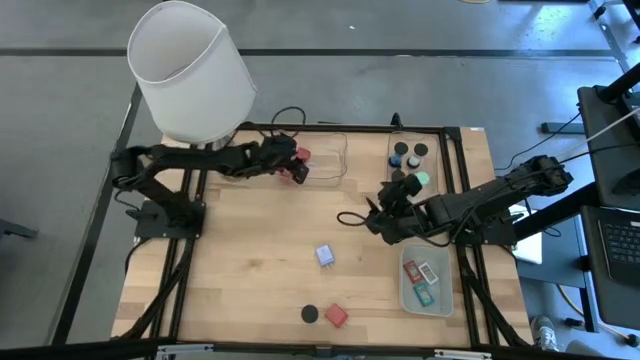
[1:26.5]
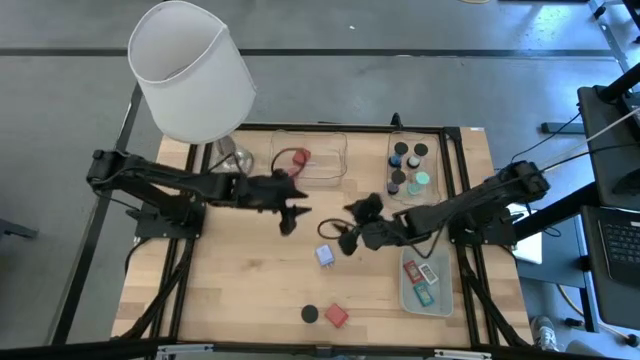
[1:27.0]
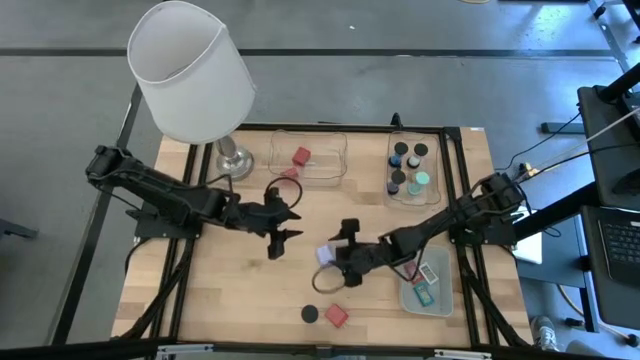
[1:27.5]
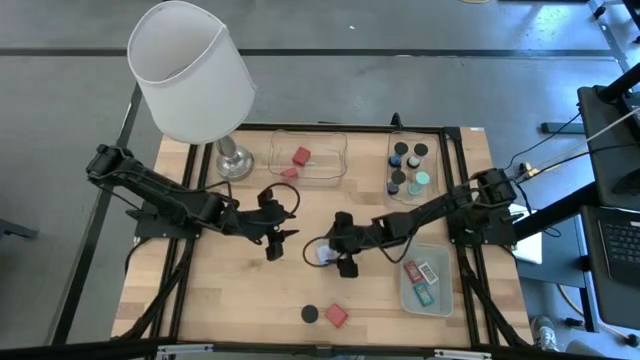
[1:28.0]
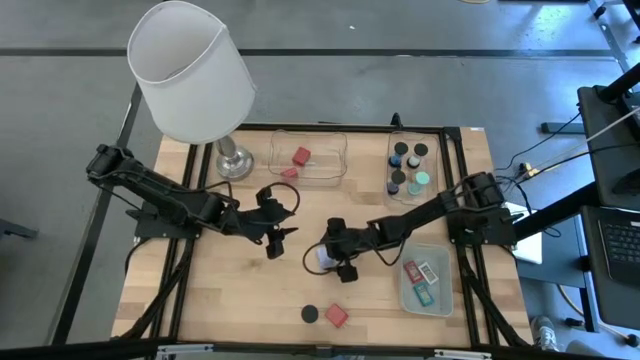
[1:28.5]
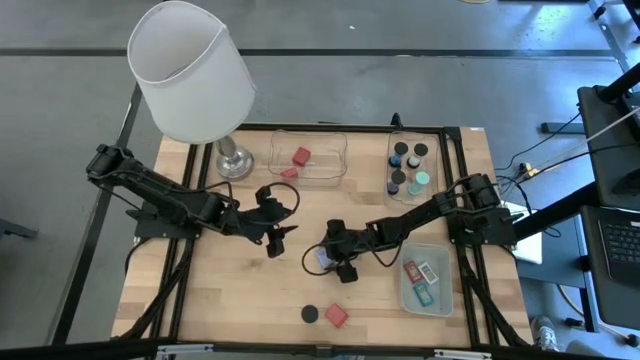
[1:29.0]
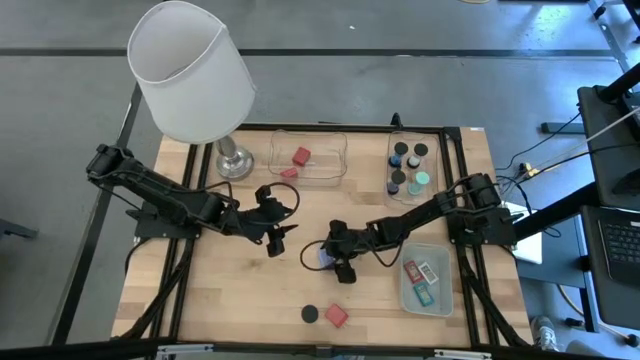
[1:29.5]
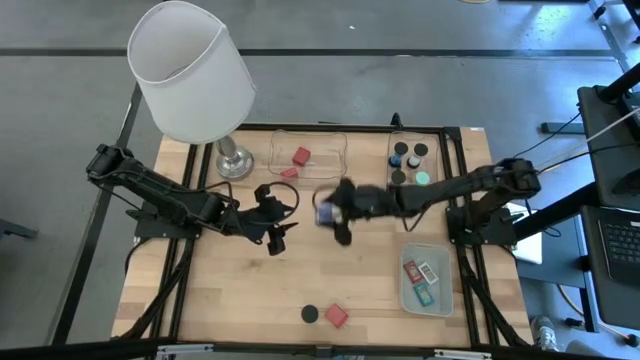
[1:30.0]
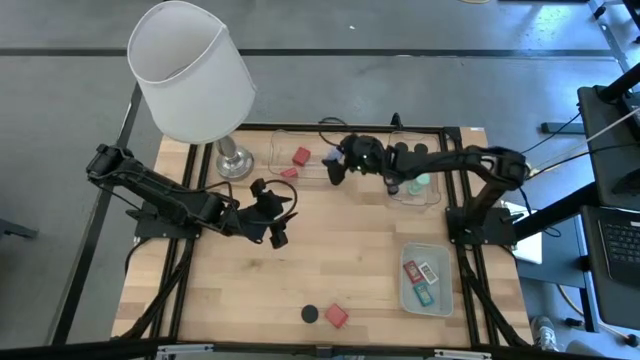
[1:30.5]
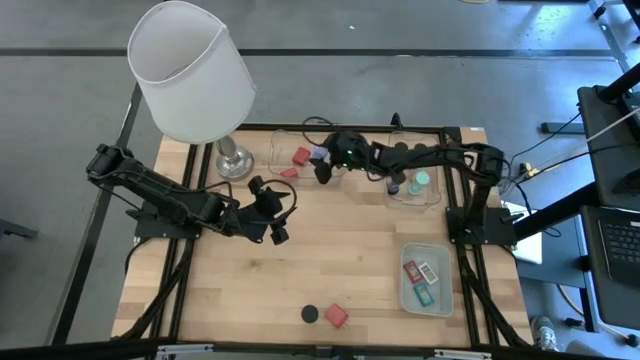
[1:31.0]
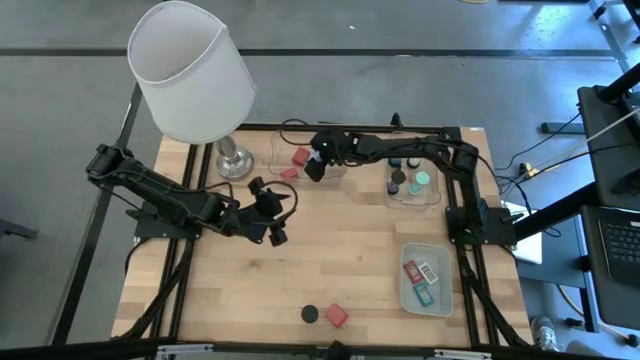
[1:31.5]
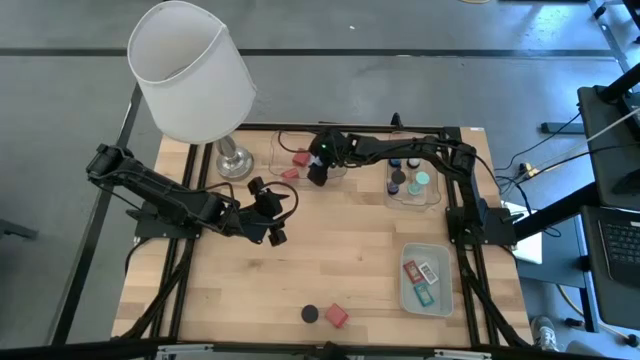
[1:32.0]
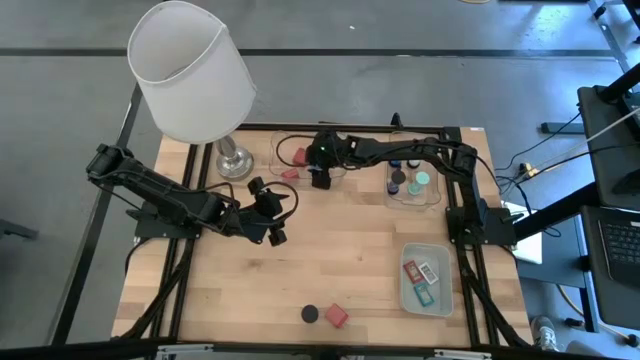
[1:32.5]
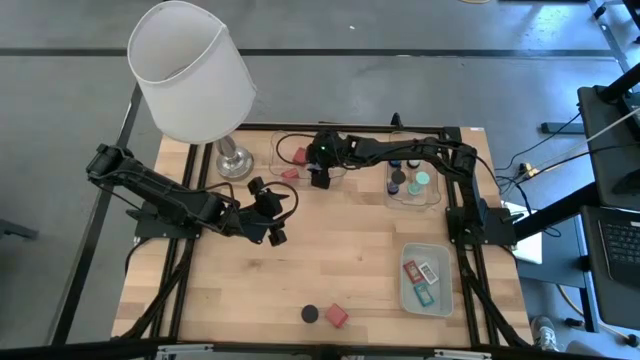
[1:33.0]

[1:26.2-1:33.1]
Task: Pick & Place Office items
Put the blue charger adapter into the left transparent bin

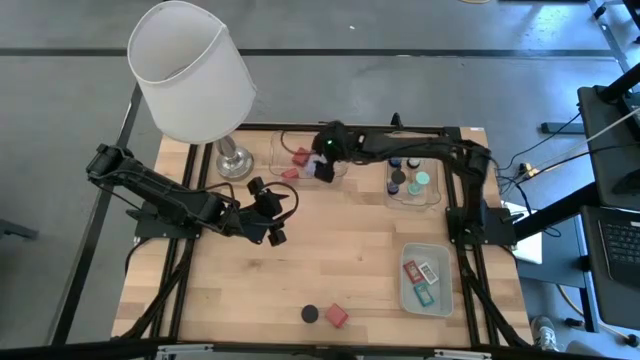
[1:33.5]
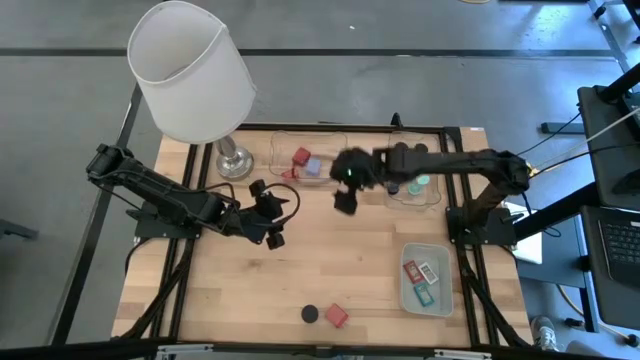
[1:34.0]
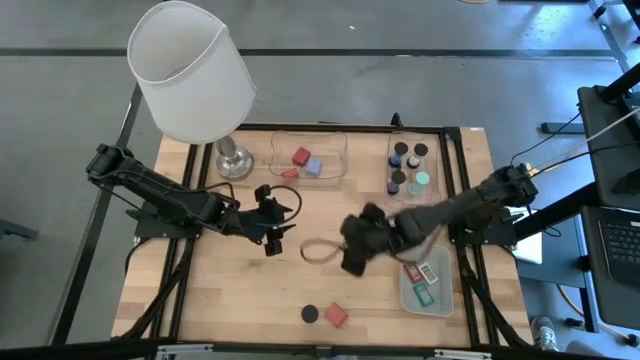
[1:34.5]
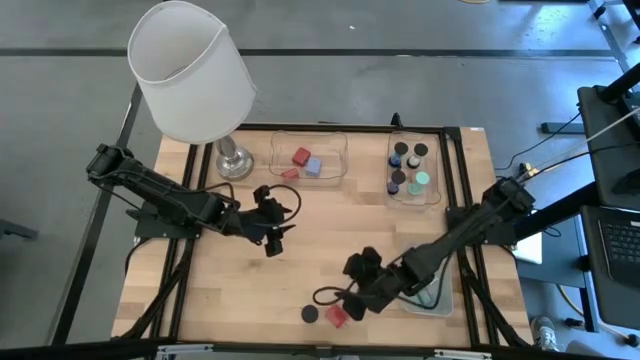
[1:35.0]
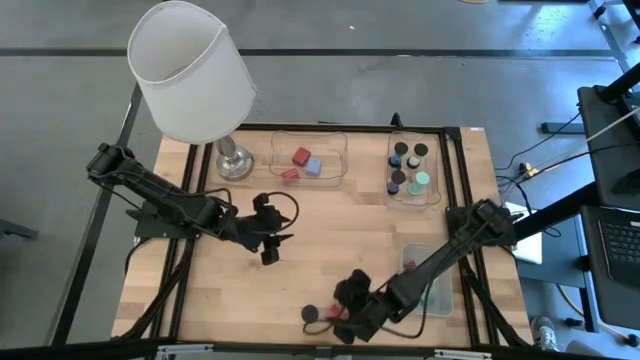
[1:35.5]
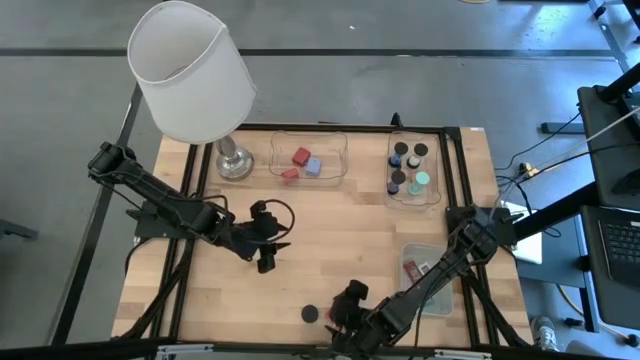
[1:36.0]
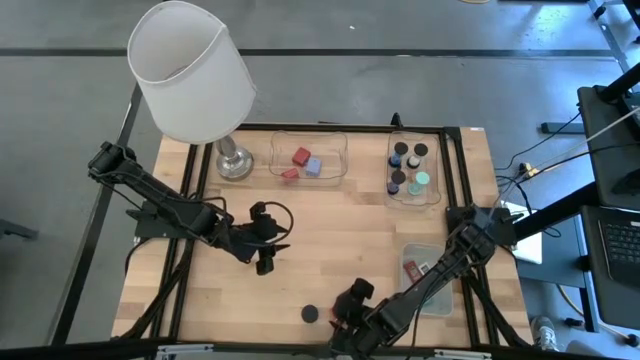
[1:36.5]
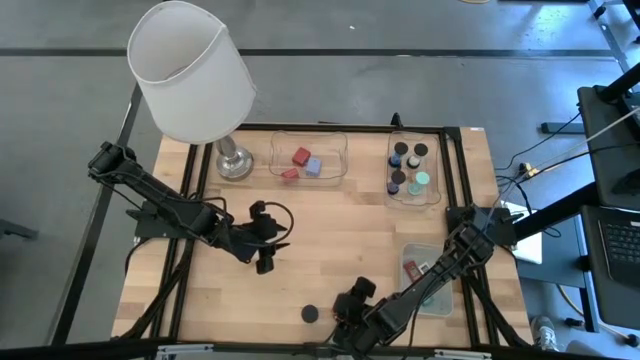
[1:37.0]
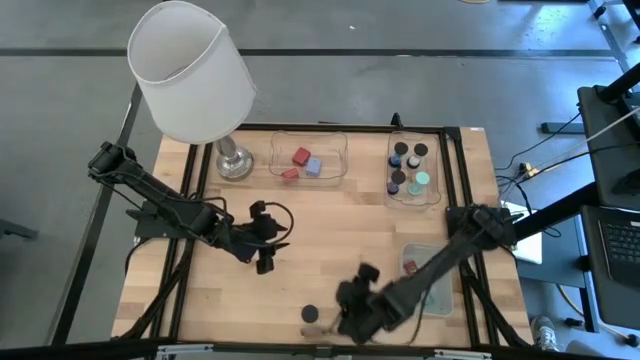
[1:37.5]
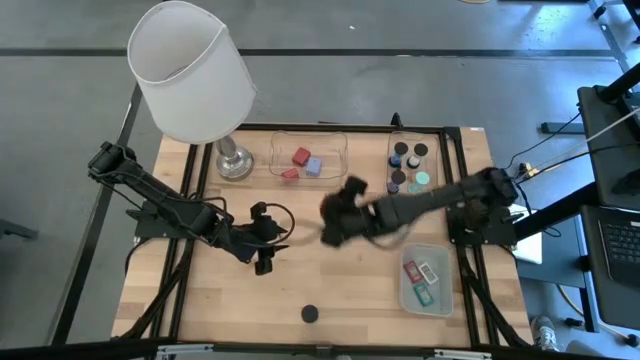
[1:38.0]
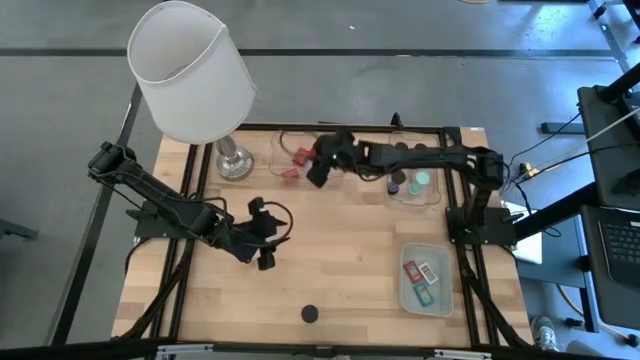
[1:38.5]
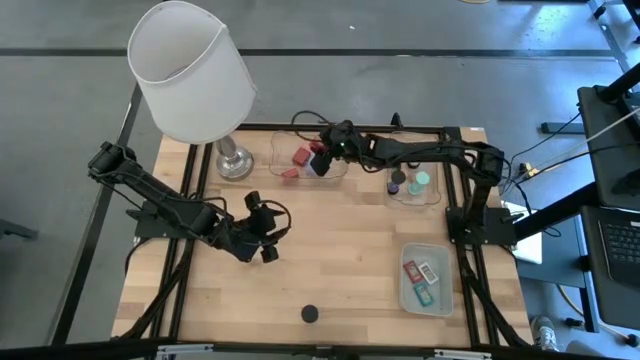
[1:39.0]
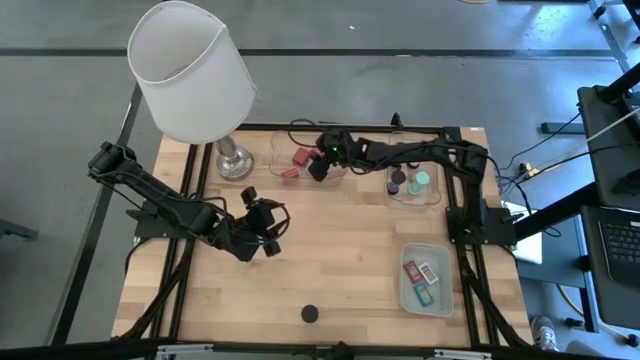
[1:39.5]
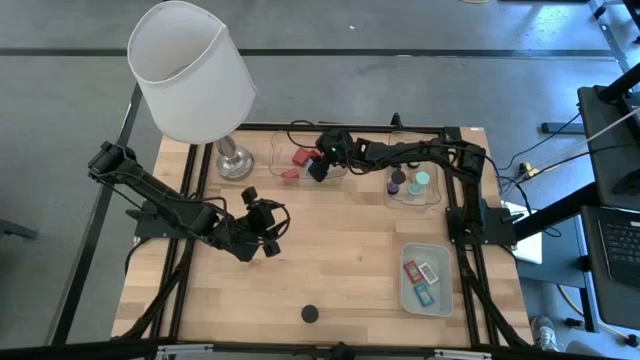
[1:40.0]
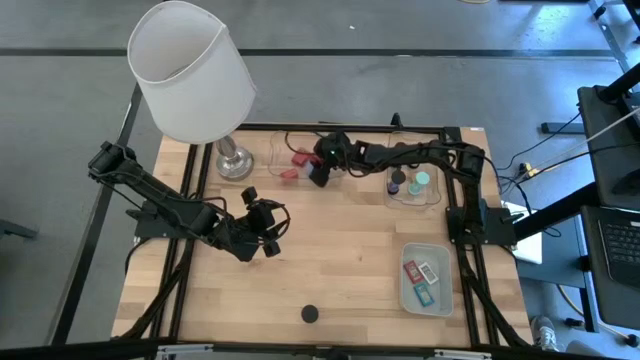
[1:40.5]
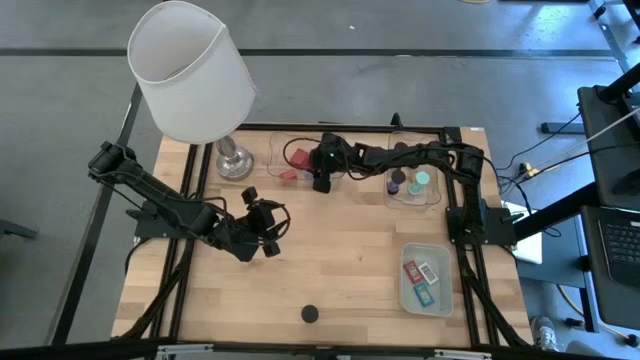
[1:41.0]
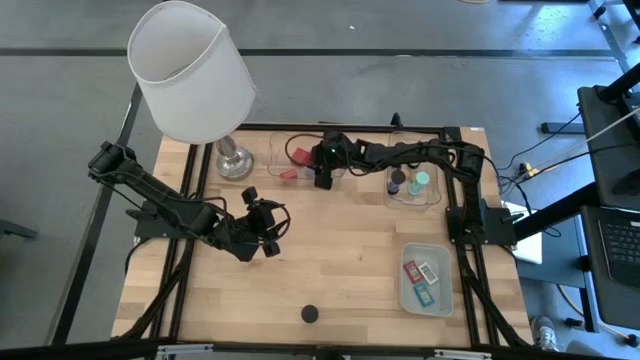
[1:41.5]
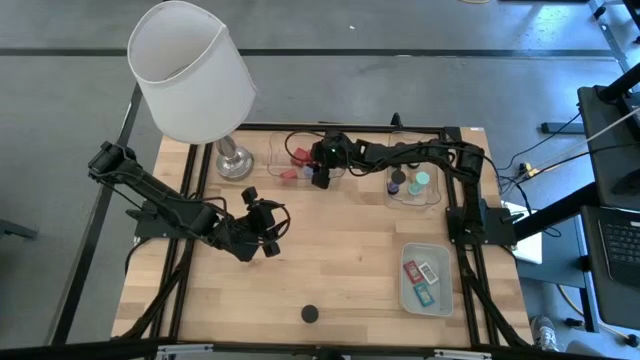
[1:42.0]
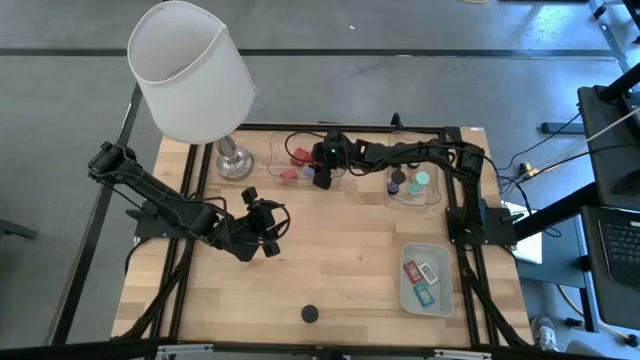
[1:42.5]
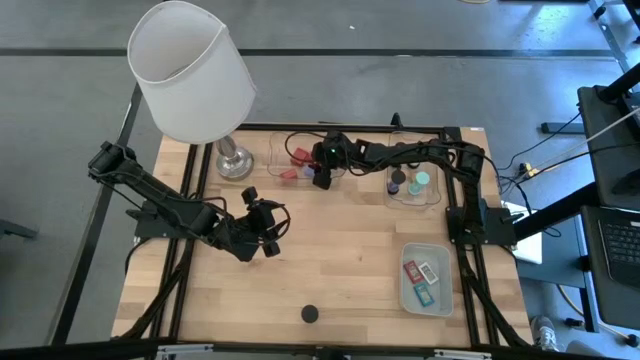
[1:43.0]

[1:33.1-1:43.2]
Put the red charger adapter into the left transparent bin

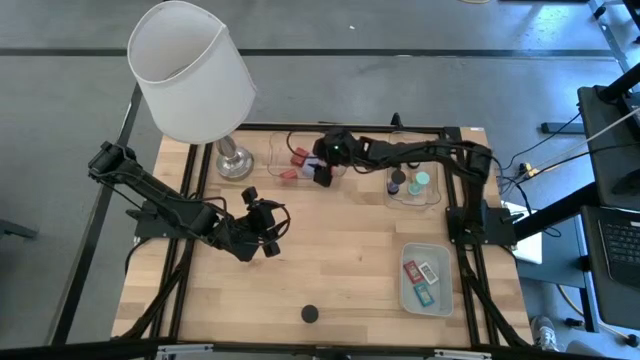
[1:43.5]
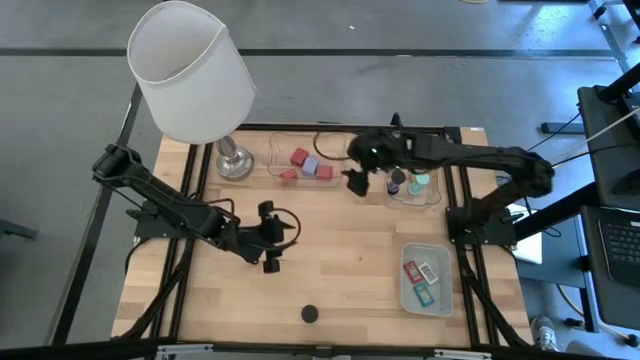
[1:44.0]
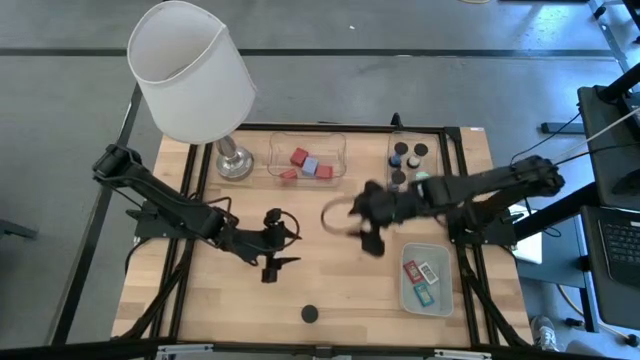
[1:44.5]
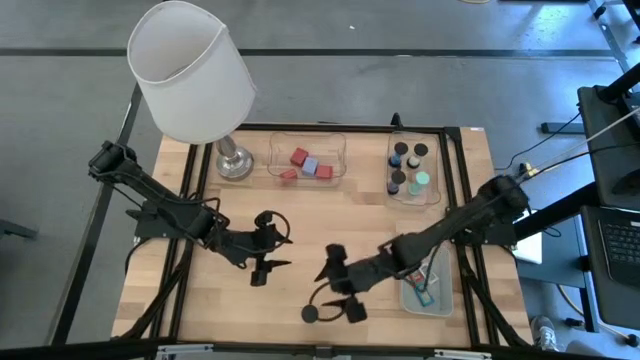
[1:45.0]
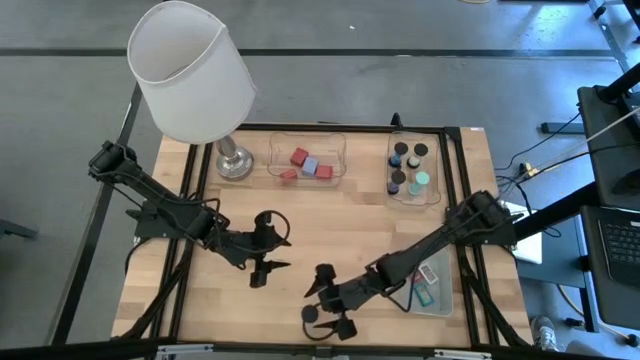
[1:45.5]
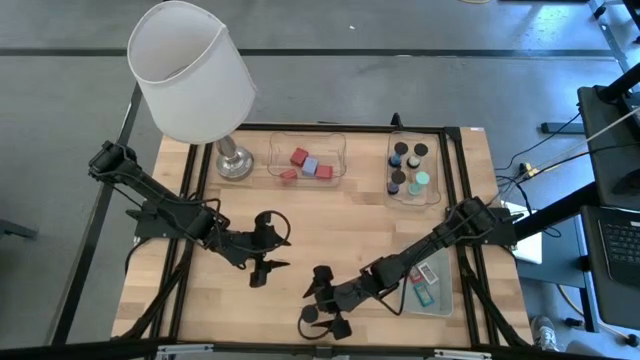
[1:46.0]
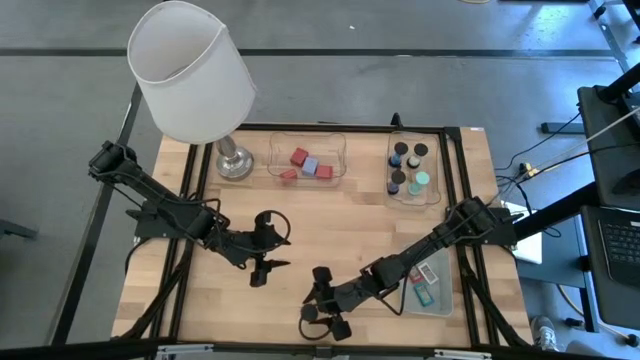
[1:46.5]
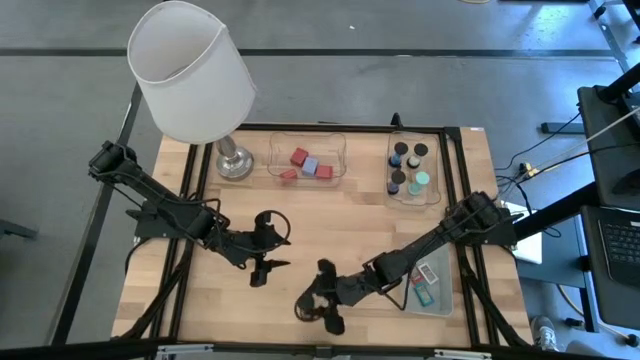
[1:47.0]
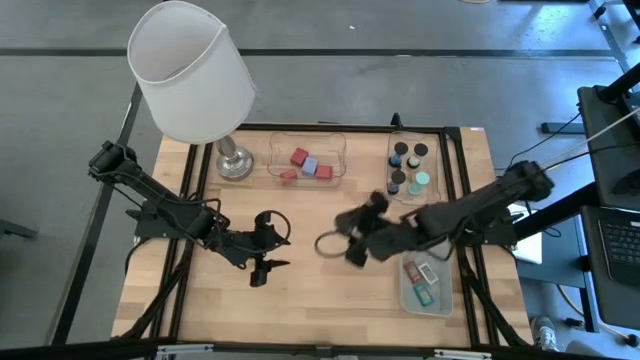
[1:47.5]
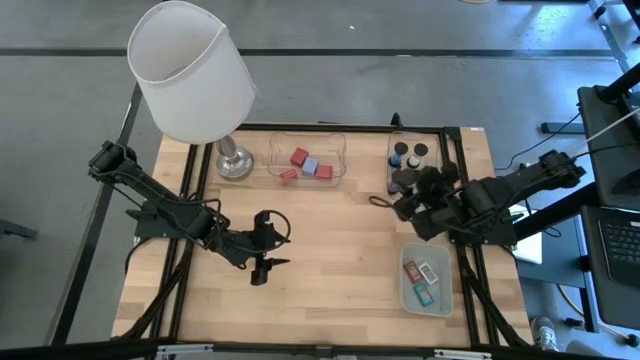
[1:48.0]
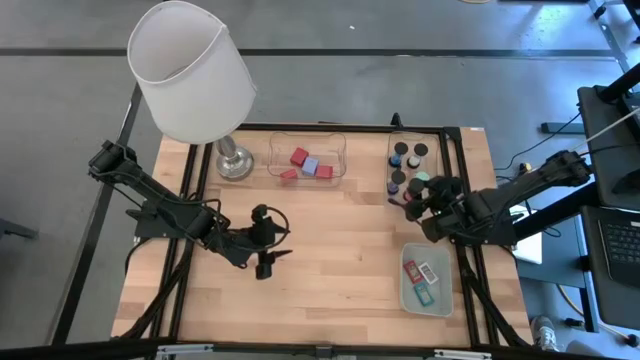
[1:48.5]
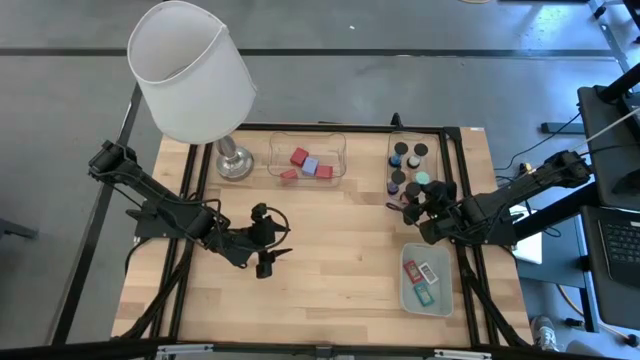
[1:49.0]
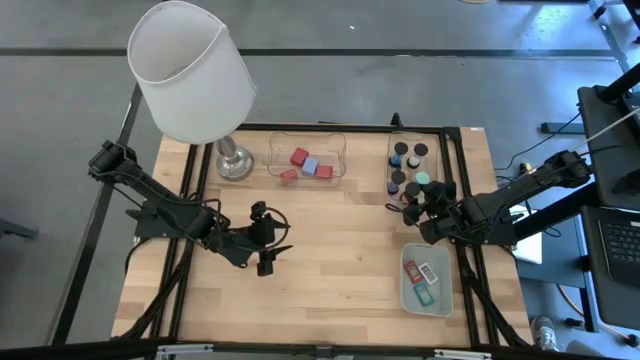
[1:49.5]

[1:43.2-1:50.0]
Put the red hourglass into the right transparent bin
